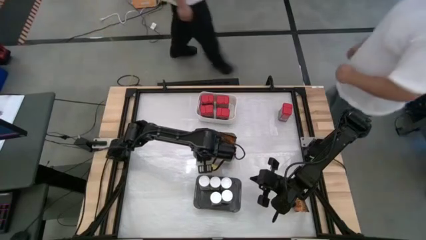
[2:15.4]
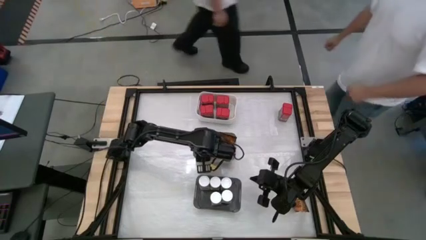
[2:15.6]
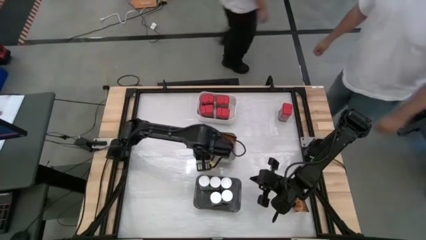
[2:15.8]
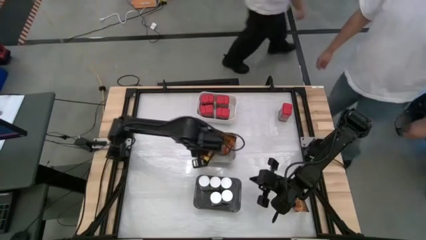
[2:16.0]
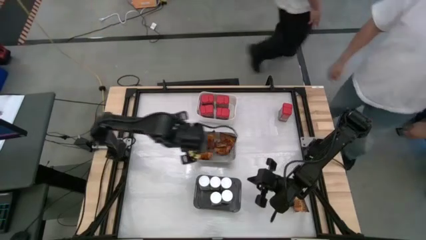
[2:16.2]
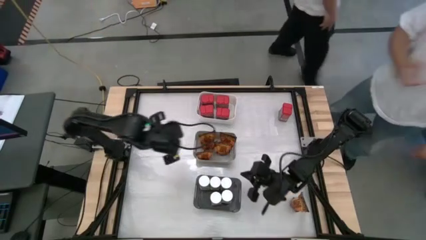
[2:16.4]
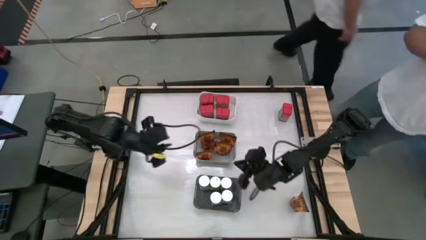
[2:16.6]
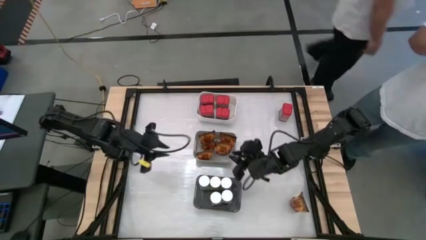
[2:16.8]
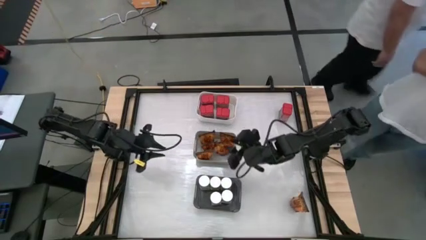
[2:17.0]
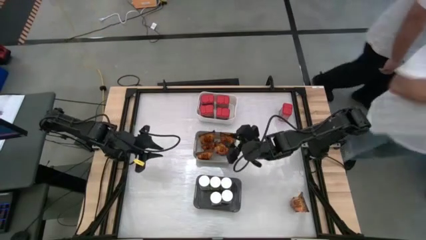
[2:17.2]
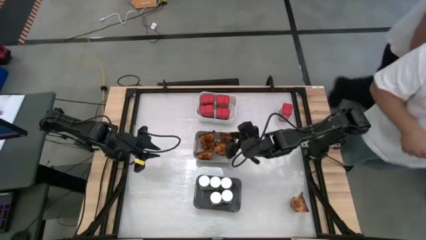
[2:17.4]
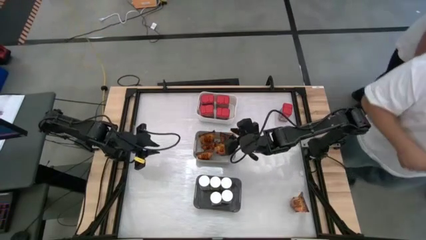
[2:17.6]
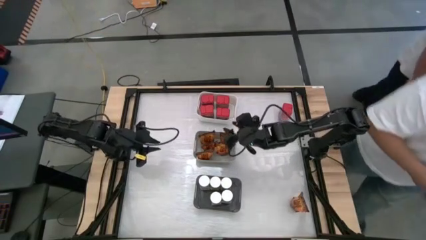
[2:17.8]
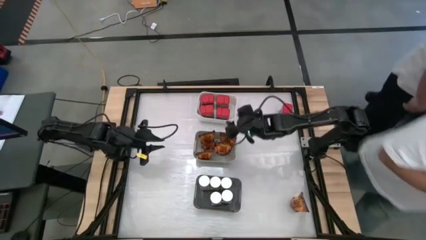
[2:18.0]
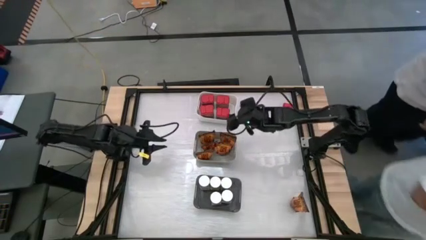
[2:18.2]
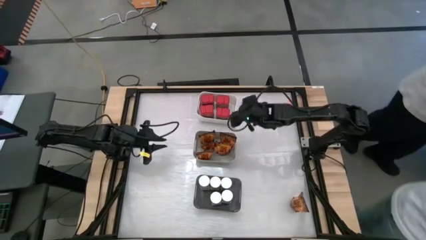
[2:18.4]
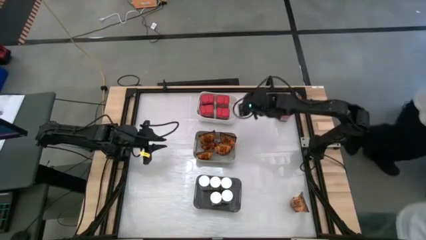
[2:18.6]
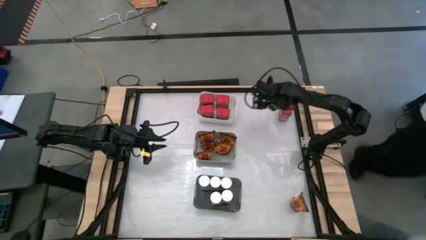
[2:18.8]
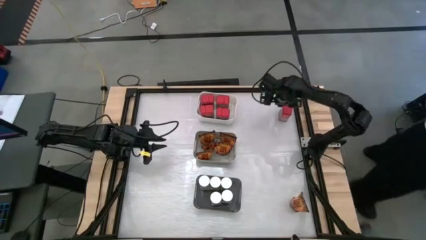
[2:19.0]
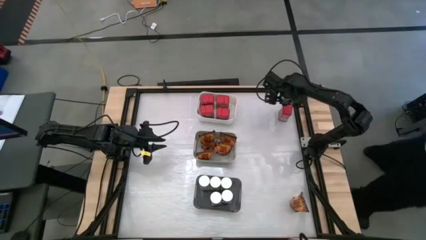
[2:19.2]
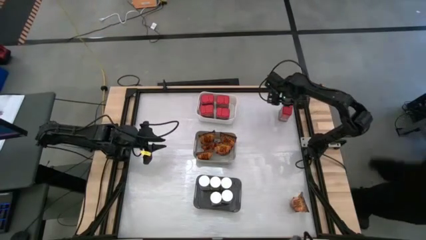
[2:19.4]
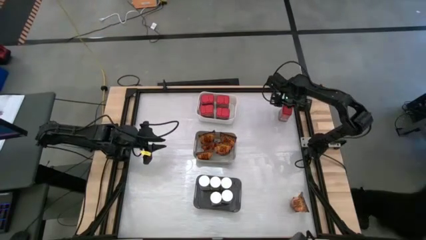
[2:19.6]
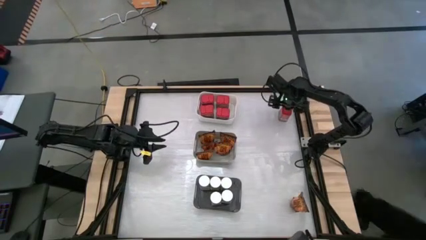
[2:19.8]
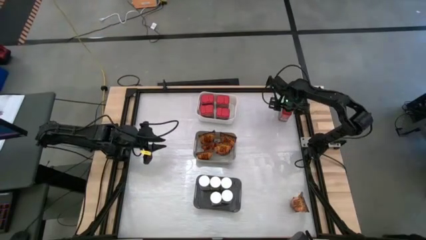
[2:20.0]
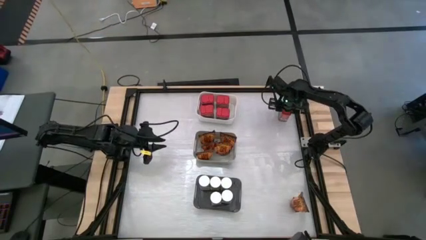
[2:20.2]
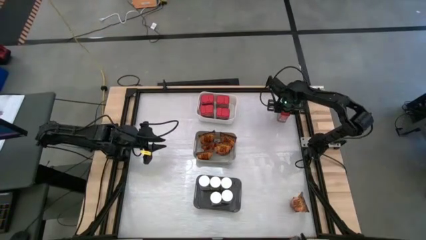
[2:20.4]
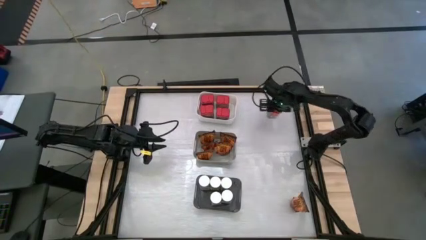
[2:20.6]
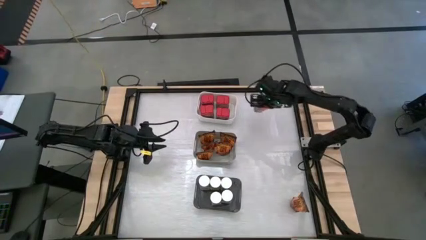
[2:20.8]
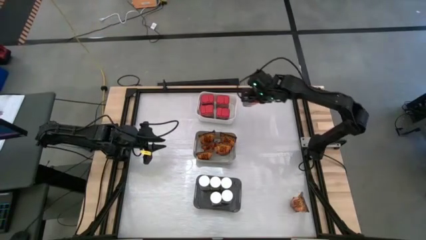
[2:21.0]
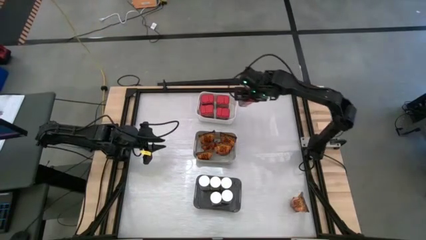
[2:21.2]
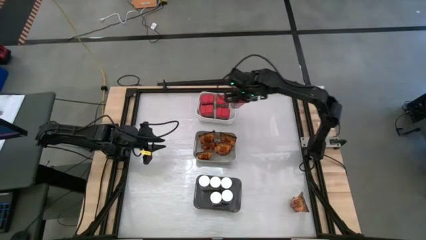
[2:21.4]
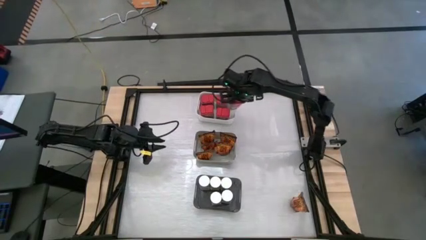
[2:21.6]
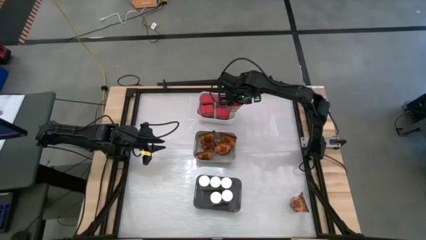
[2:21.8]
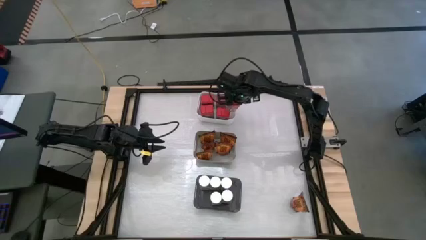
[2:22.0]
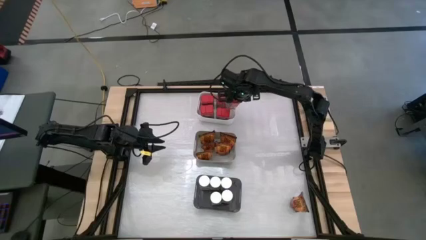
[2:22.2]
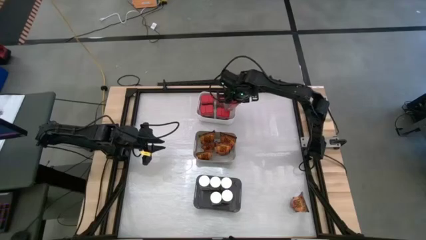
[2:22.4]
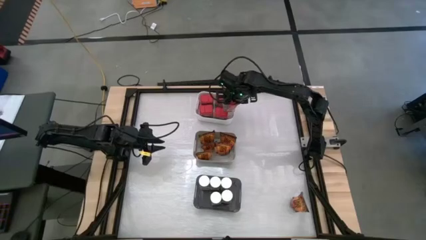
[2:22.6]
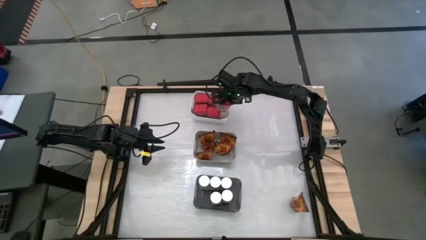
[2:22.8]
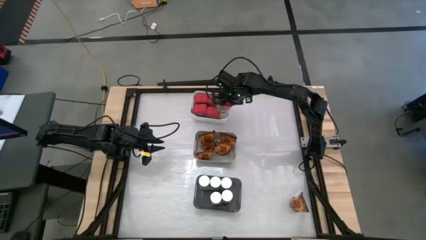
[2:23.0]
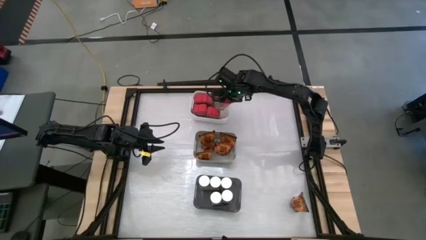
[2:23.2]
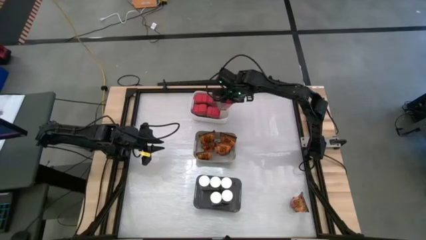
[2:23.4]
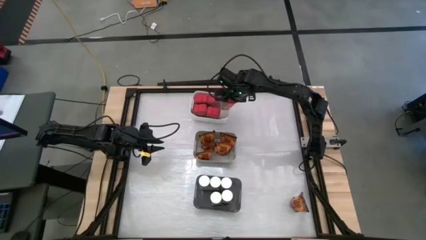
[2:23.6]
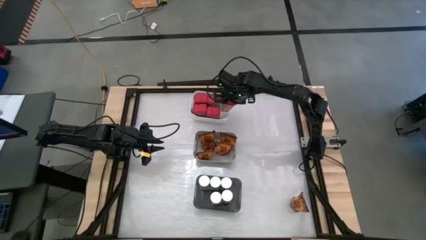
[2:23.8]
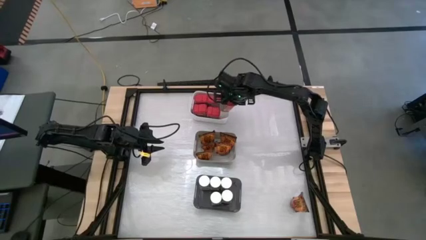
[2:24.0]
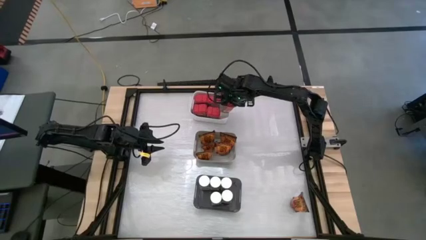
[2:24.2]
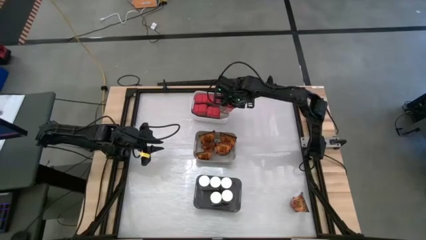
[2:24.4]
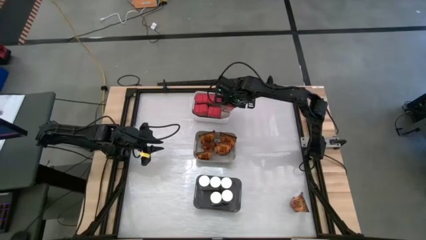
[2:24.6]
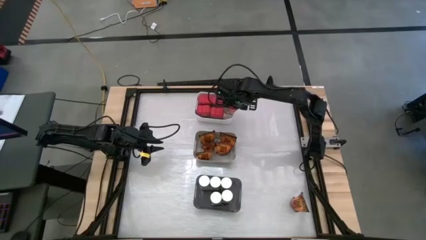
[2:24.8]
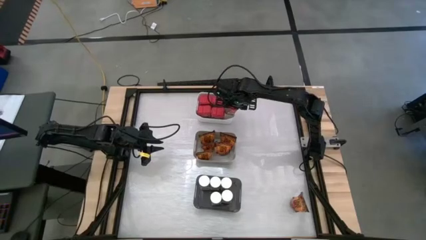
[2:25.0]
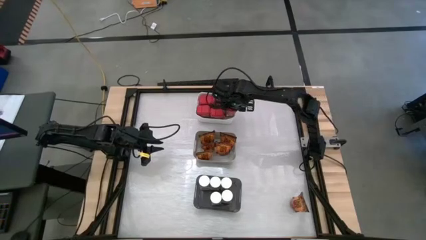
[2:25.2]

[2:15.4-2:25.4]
Task: Sort spices by type
Put the red seasoning can into the white bin

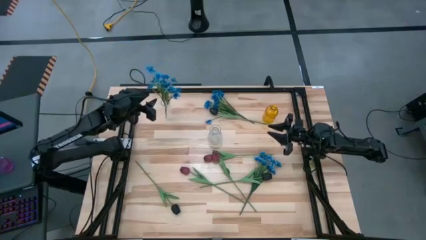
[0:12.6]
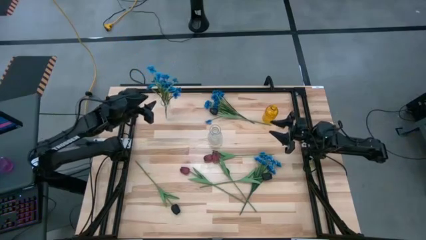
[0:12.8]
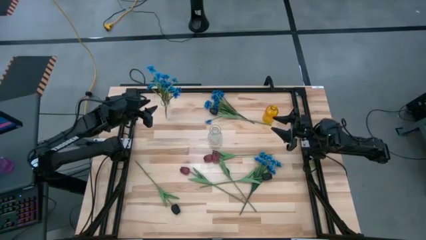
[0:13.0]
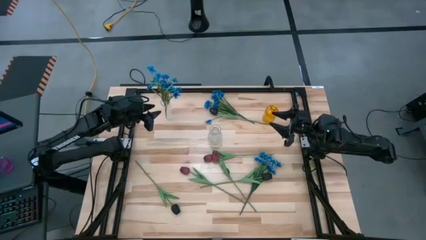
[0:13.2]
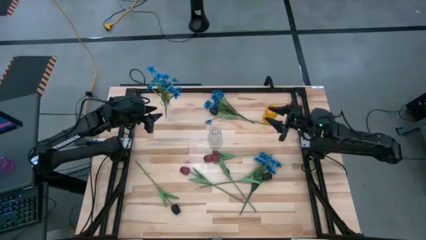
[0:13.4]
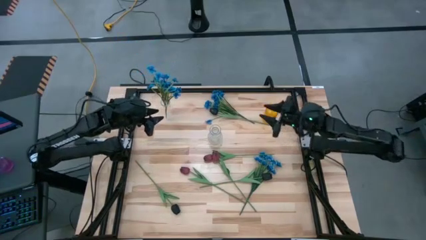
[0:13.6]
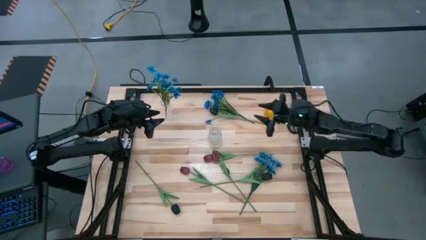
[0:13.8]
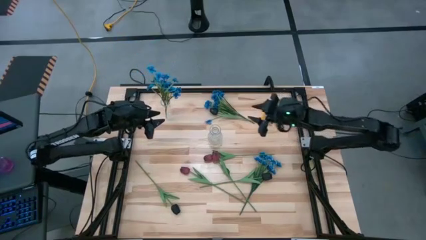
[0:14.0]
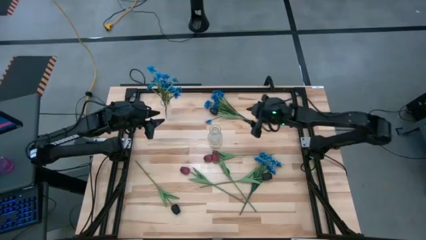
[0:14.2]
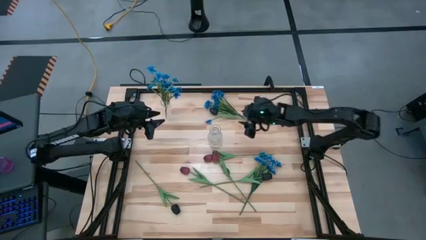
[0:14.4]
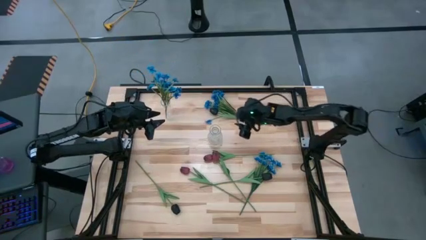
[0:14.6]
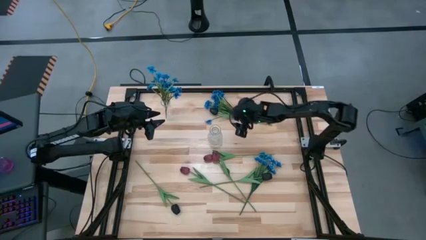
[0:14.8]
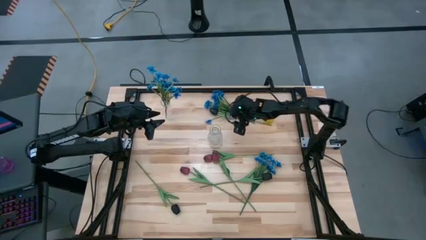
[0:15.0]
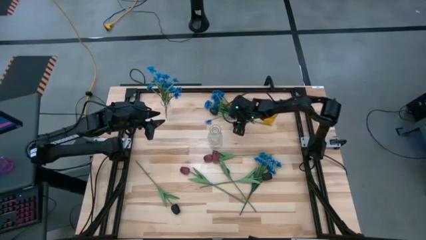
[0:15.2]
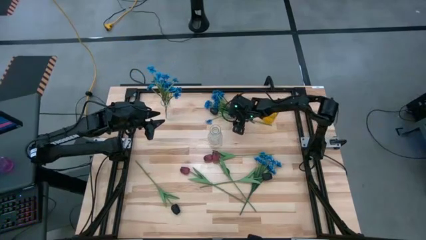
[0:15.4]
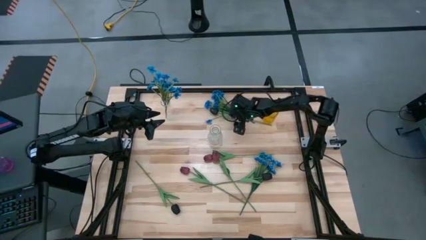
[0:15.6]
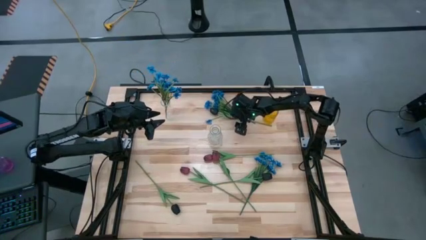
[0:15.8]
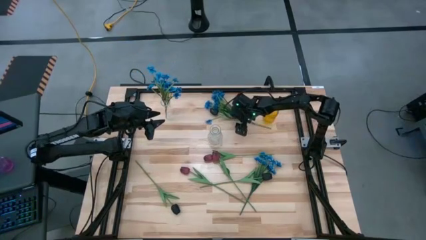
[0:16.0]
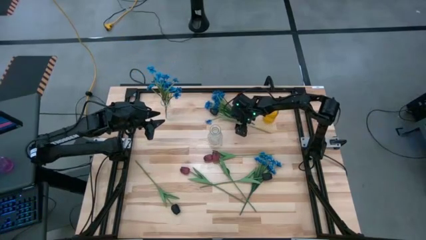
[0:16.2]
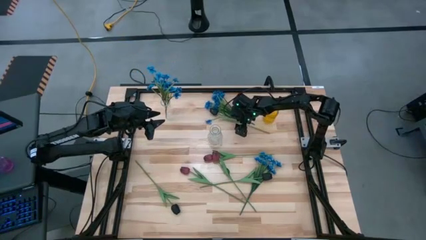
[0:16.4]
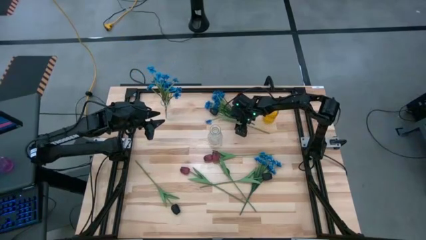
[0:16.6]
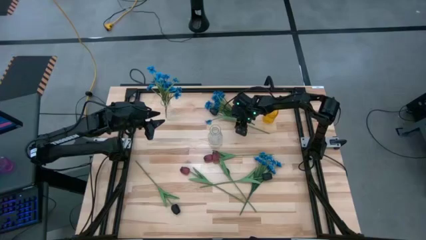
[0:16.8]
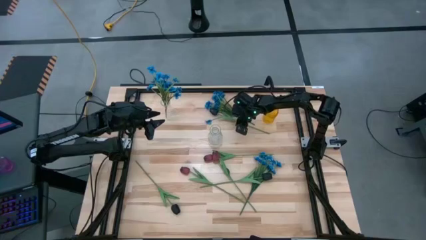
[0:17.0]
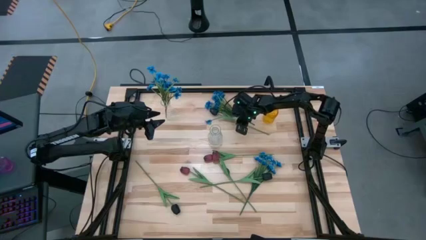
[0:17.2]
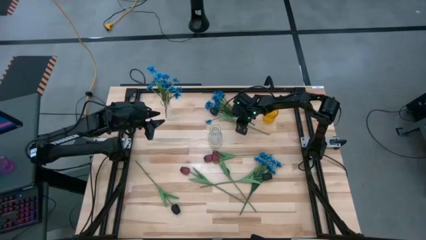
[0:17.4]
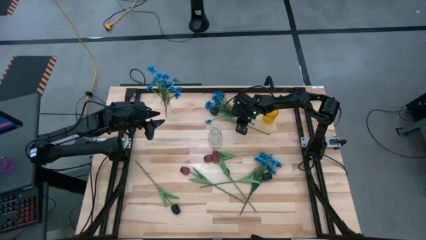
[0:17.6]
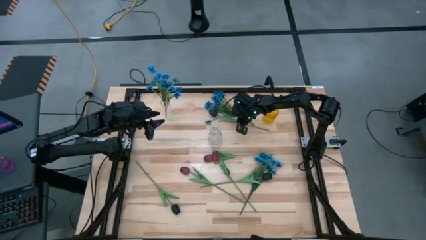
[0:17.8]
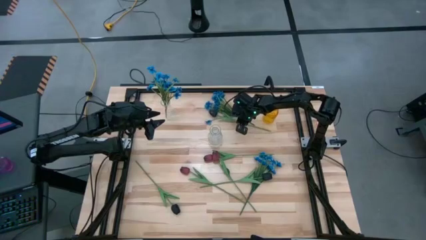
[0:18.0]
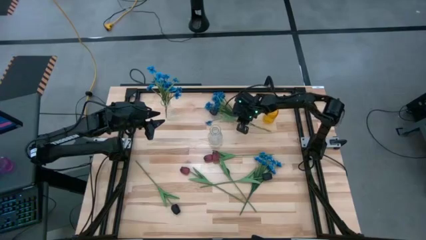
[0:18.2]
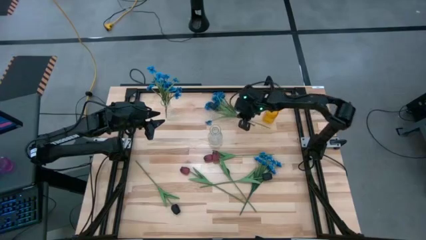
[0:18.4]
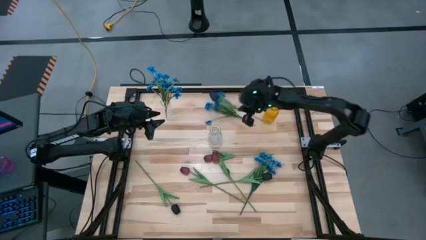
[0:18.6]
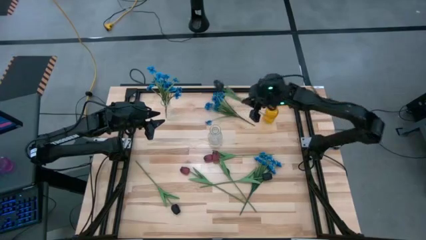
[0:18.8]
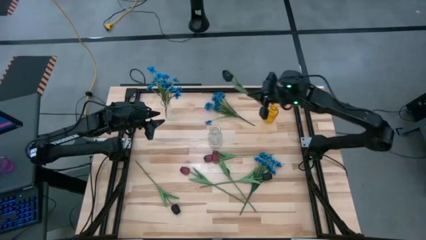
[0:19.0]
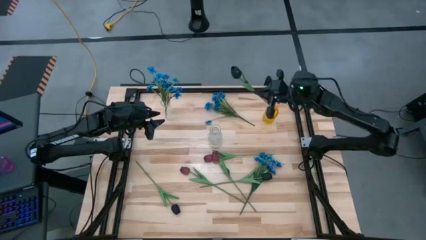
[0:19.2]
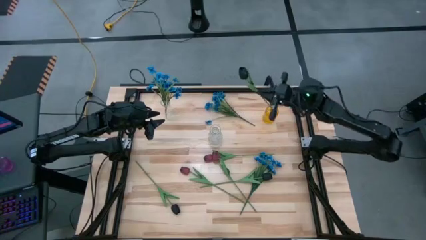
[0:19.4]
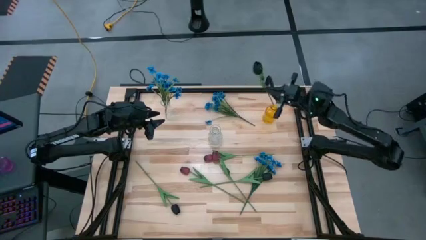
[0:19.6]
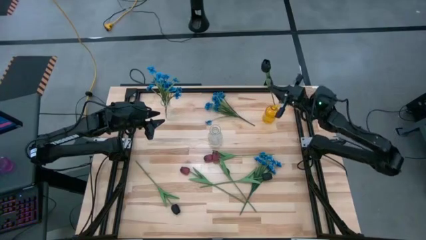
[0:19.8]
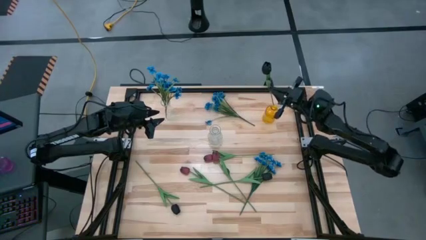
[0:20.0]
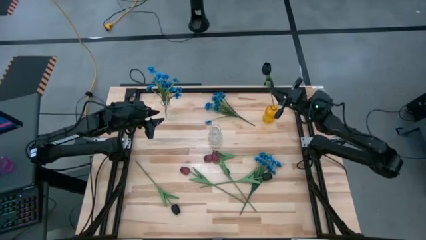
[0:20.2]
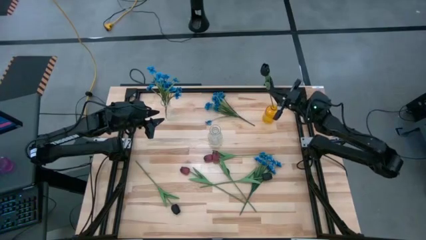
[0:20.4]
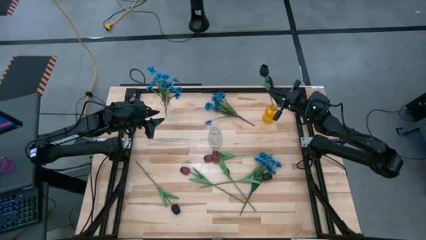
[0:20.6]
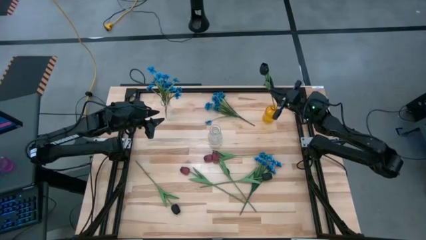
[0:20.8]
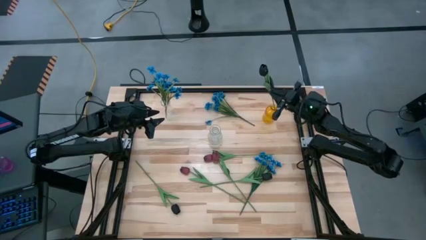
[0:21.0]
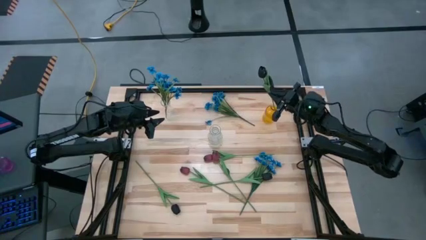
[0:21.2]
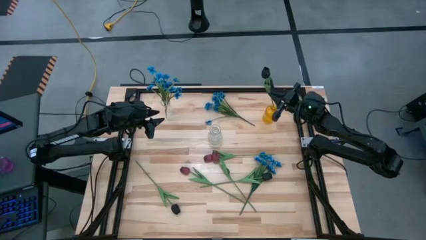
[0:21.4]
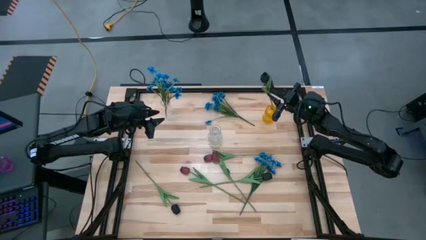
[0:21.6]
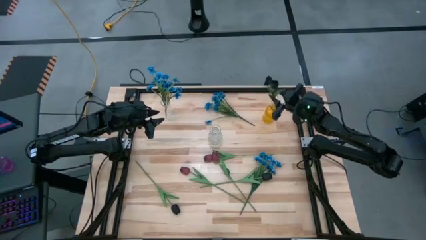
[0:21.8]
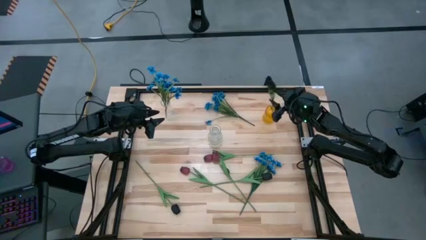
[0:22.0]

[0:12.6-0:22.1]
Task: Sort flowers into vase by color
Put the top black flower into the yellow vase
